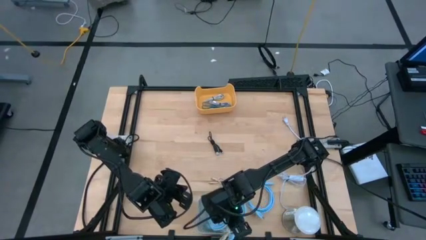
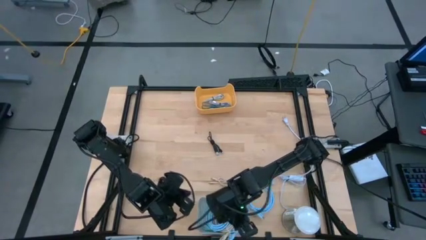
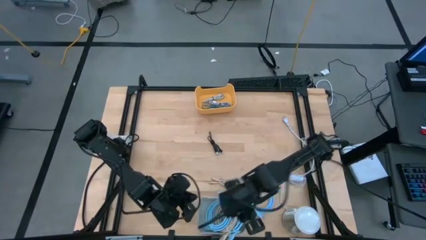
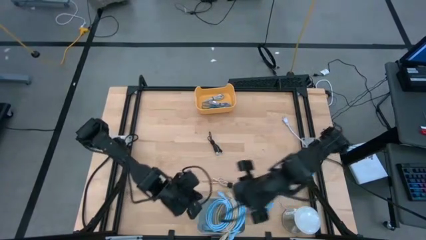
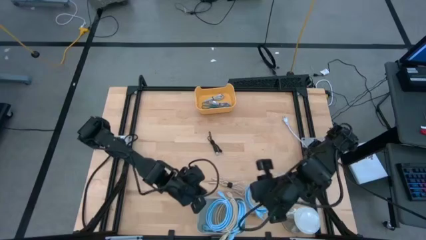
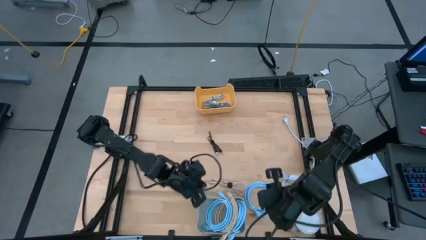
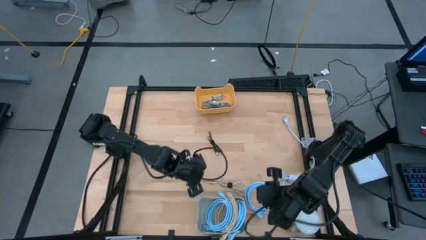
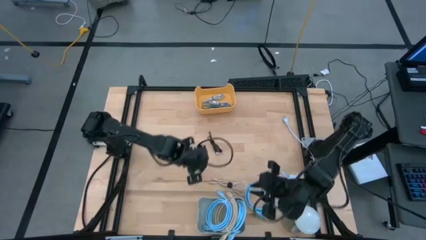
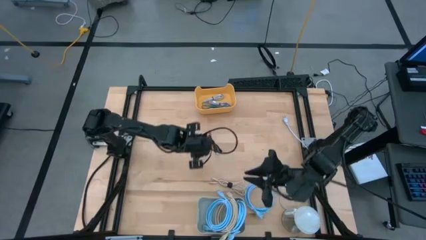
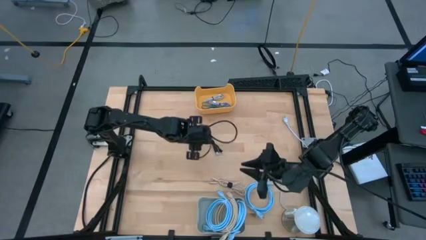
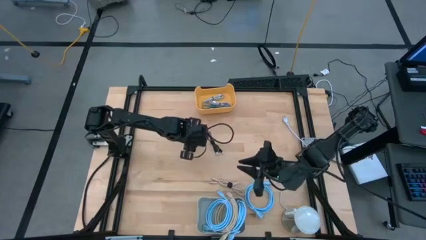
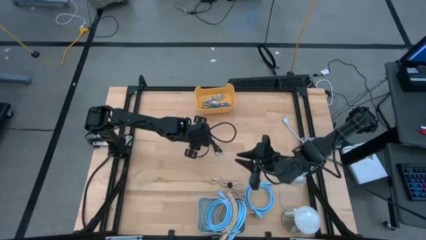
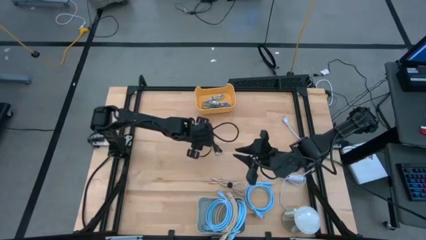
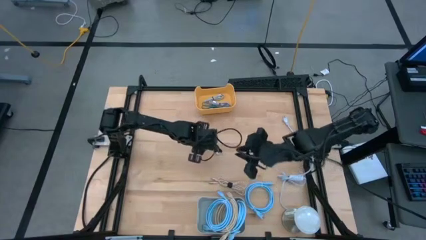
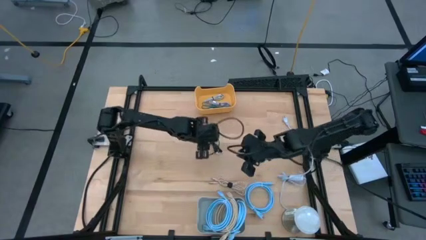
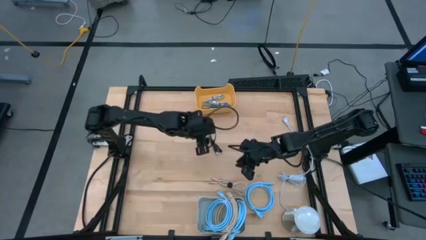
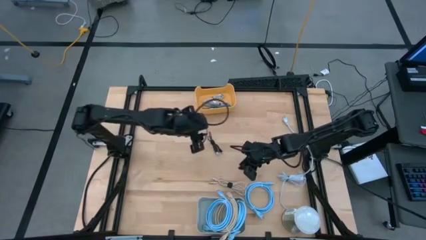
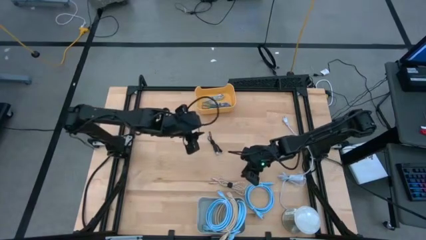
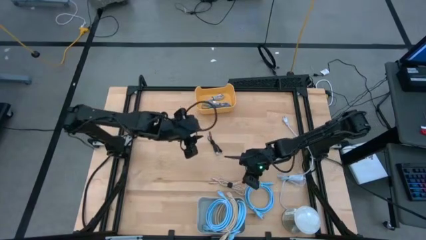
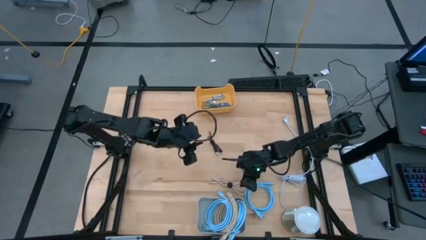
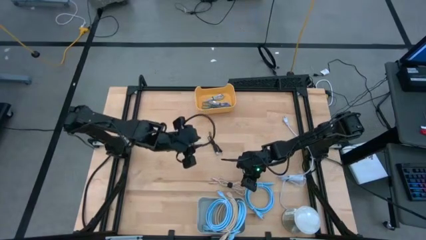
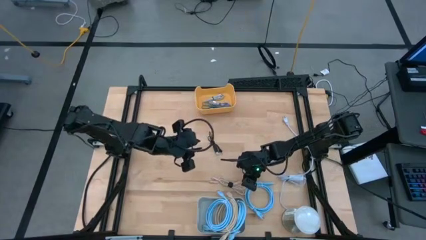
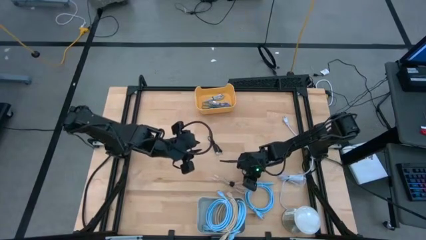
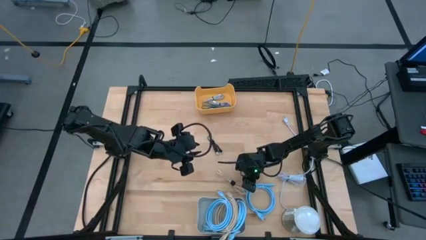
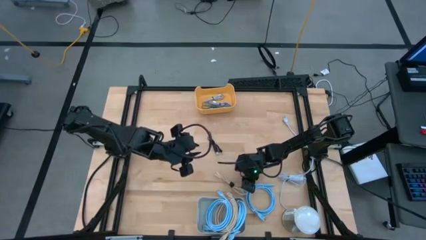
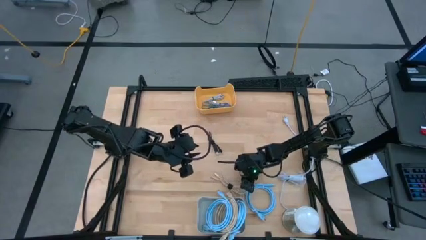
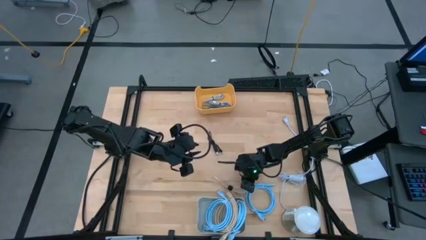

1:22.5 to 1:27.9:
Task: Sort cables into bins
Put the brown patterned charger cable into the yellow bin

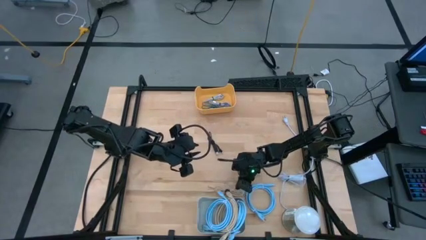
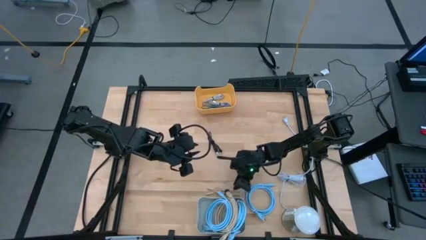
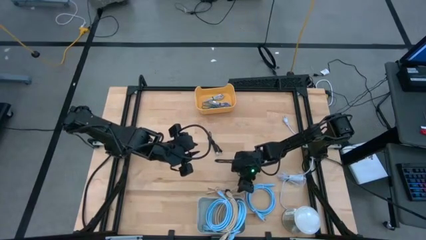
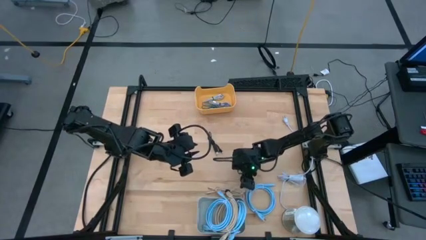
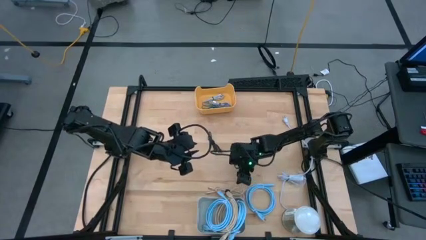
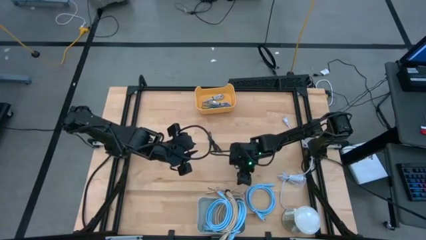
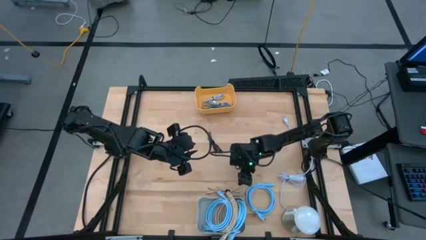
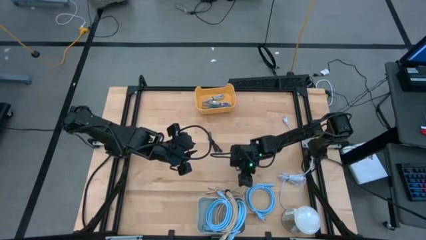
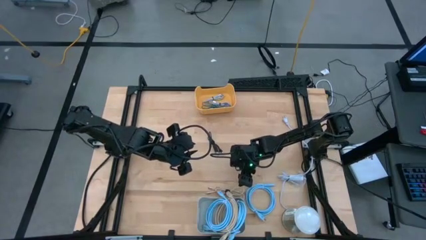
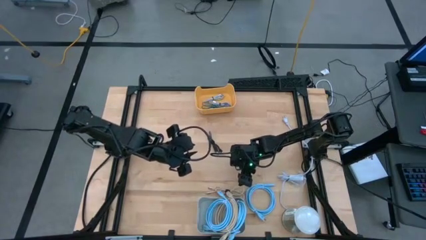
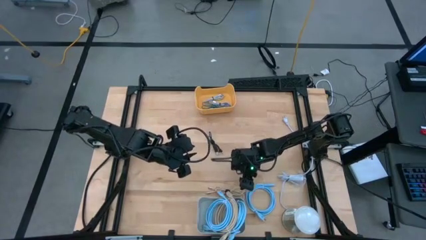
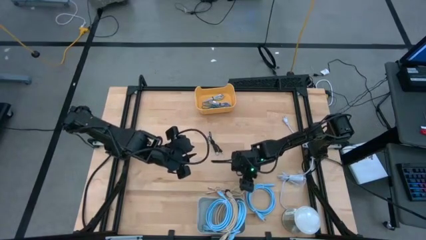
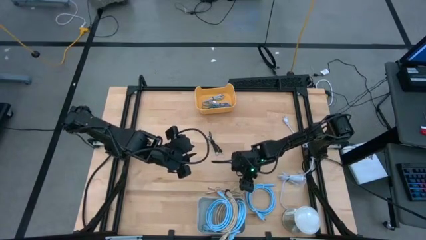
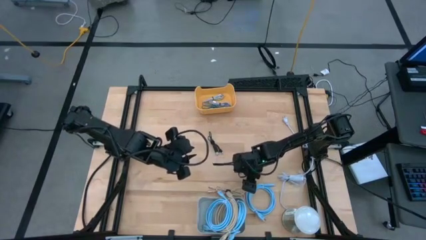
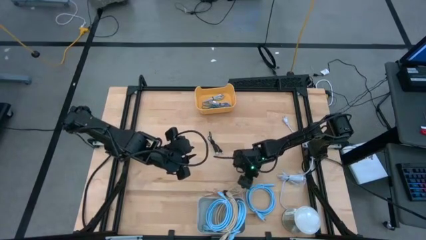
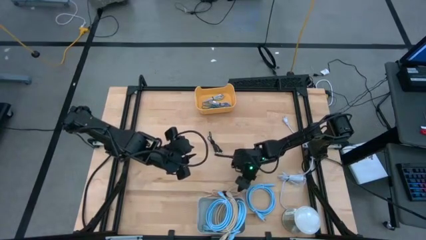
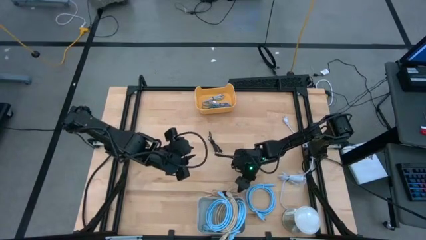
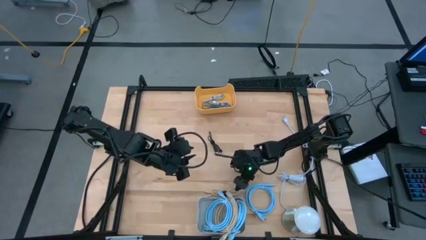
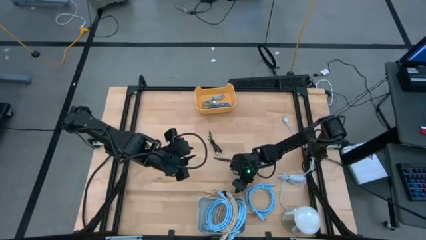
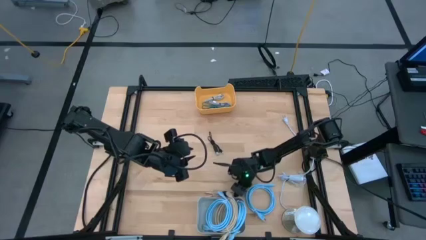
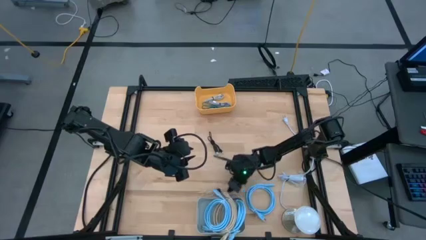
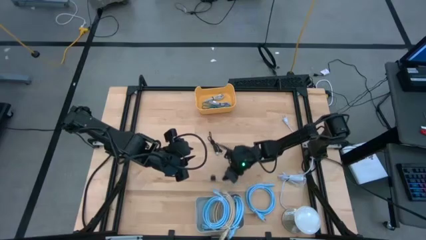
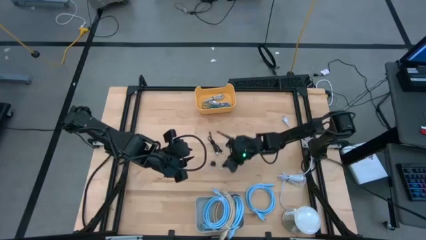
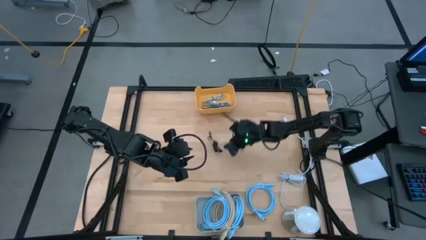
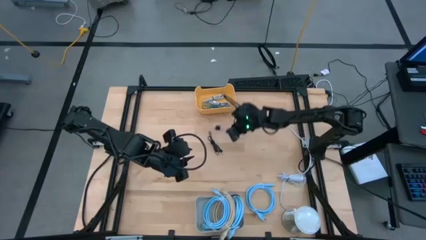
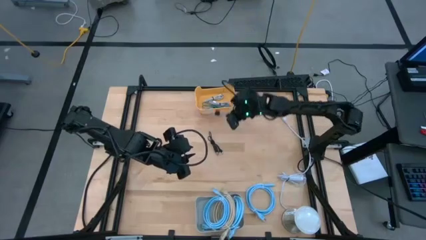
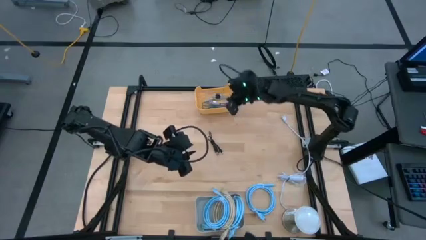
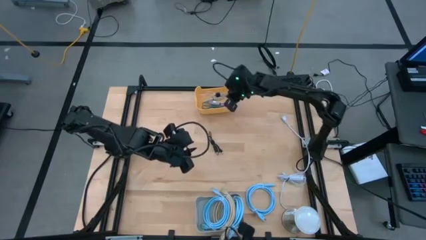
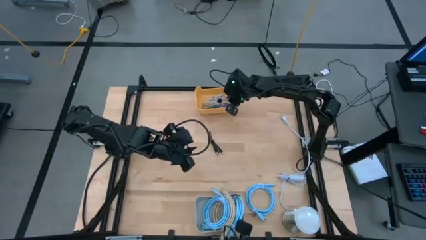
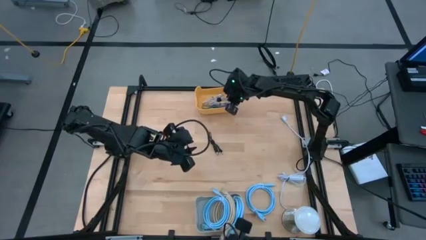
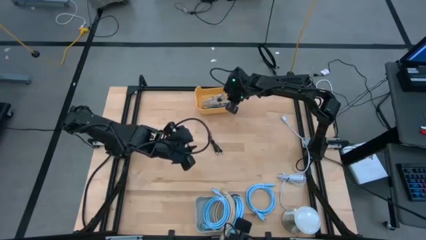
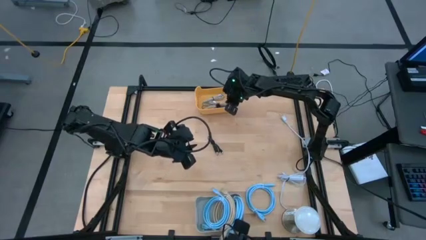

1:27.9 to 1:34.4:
Put the brown patterned charger cable into the yellow bin

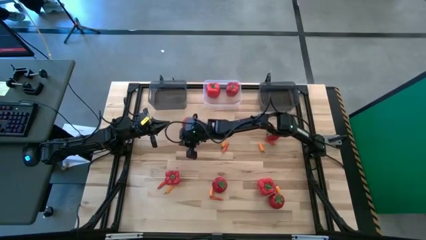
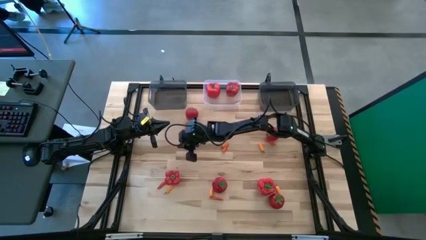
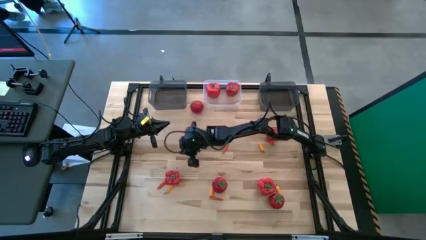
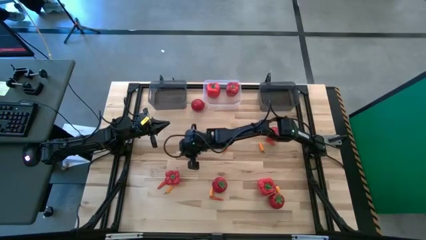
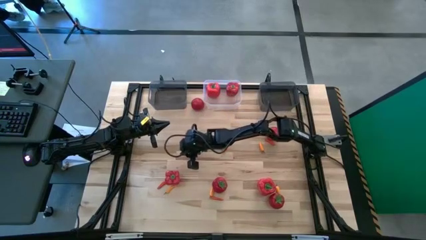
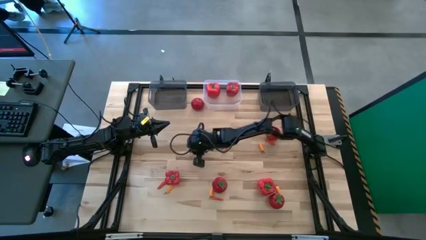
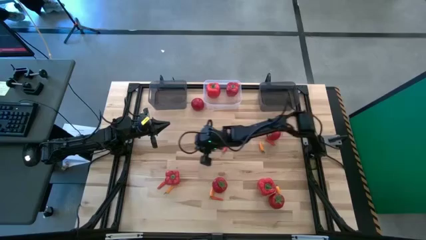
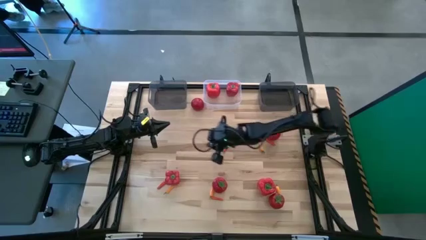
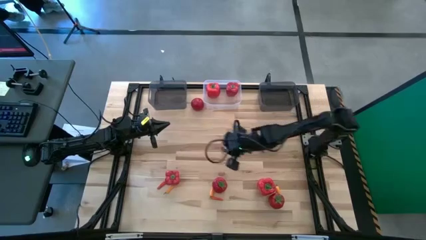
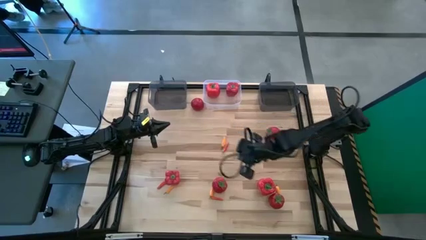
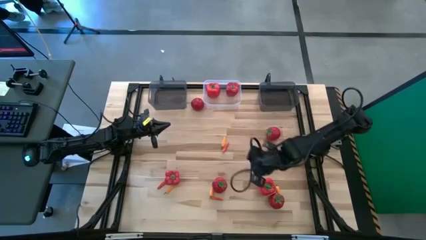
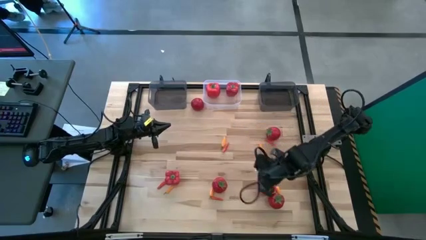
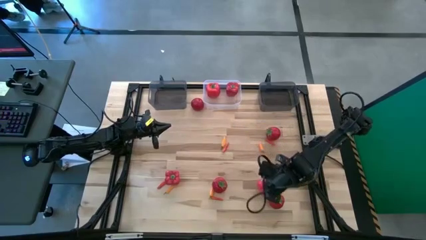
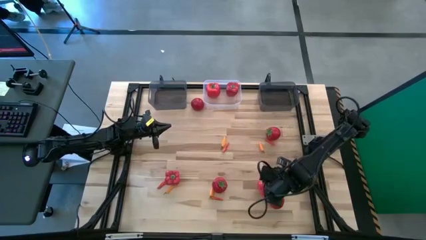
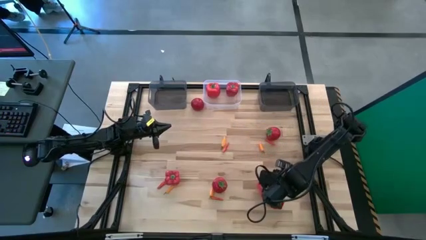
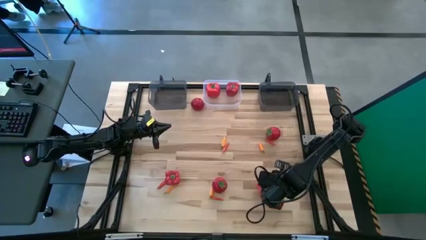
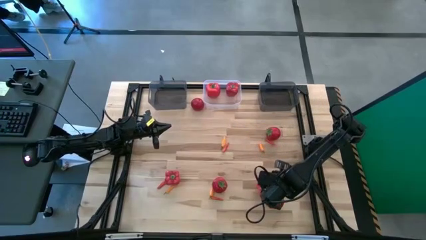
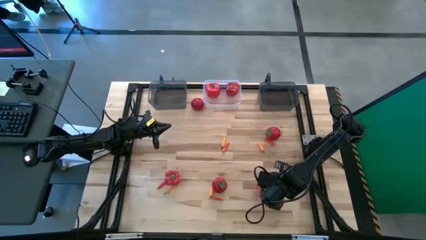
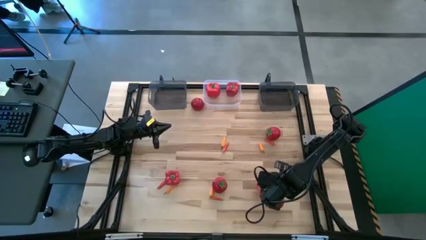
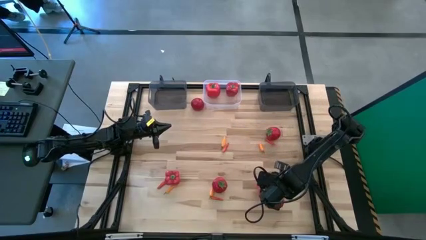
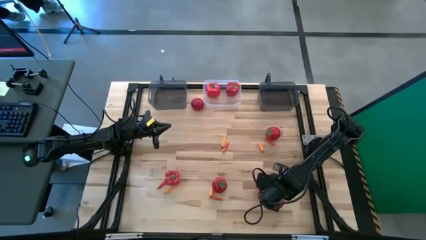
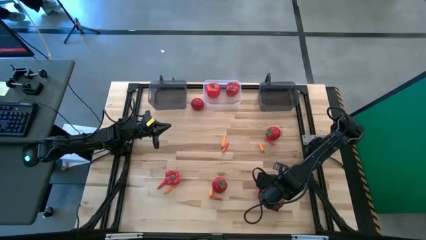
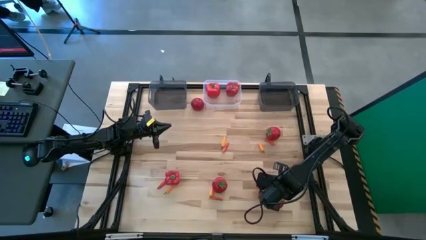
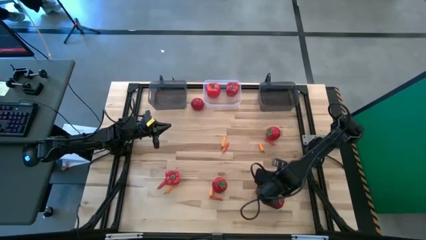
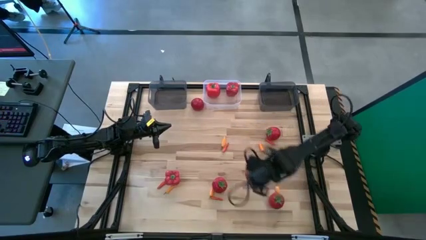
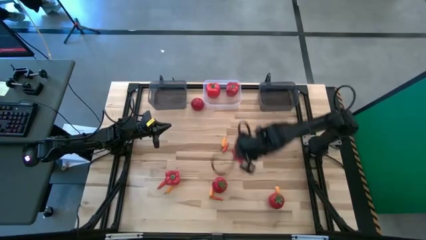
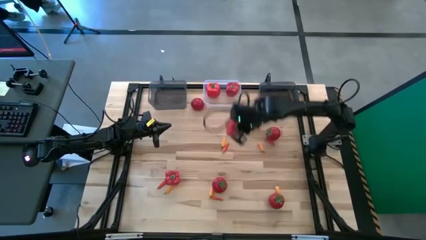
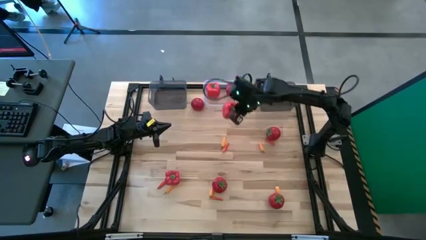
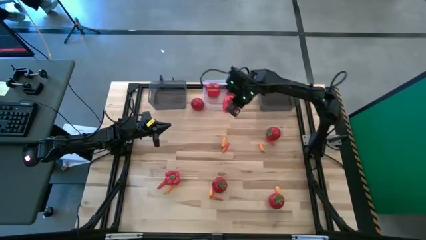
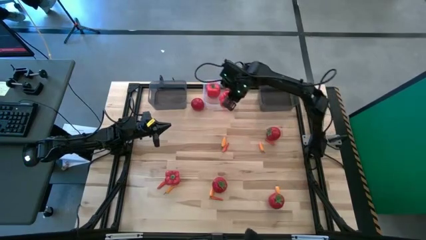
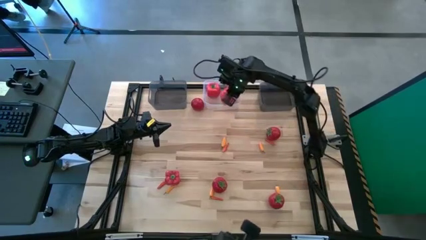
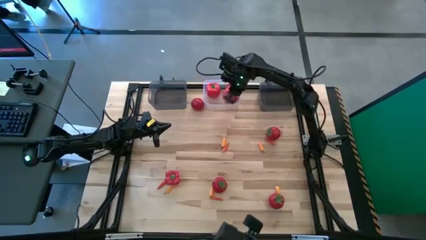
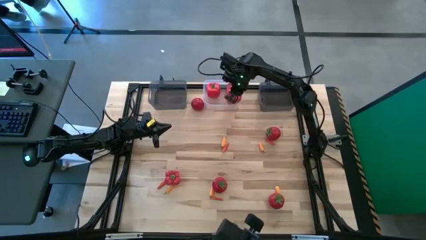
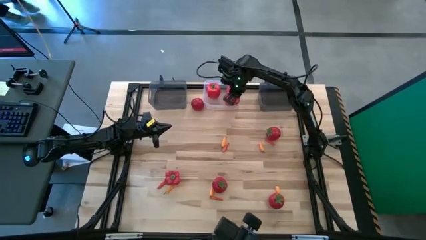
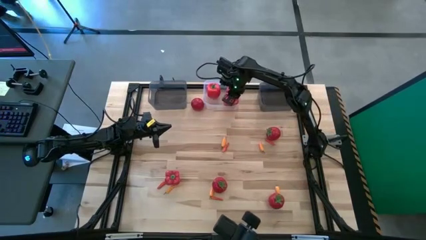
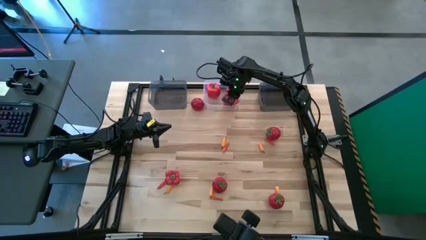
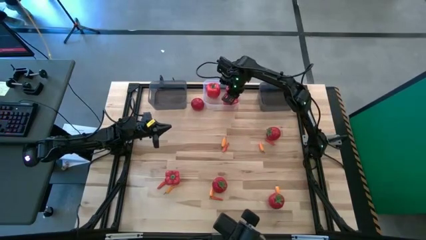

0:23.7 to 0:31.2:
Task: Sort produce into baskets
Put the red bell pepper into the transparent bin
